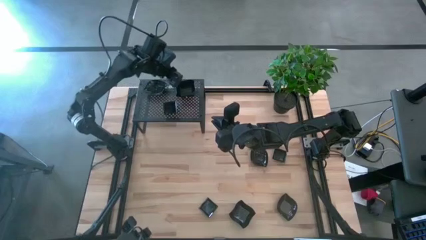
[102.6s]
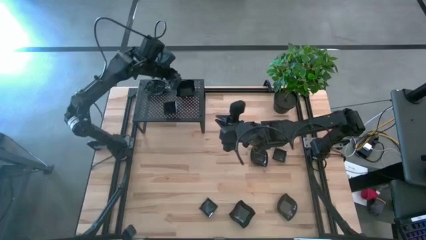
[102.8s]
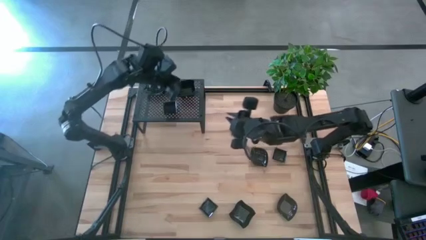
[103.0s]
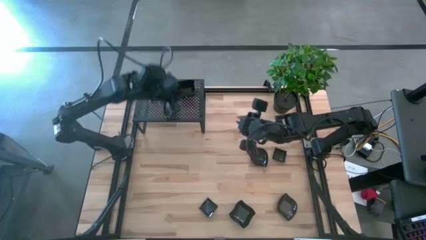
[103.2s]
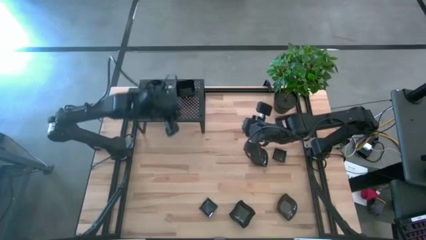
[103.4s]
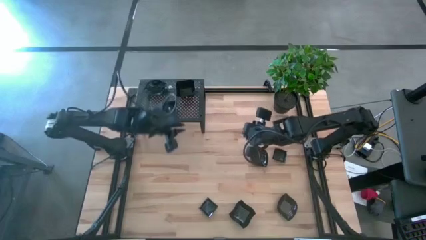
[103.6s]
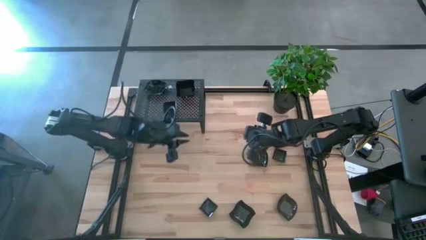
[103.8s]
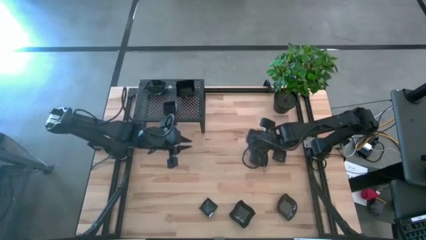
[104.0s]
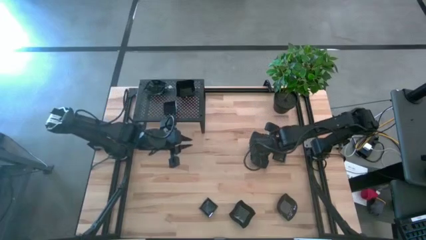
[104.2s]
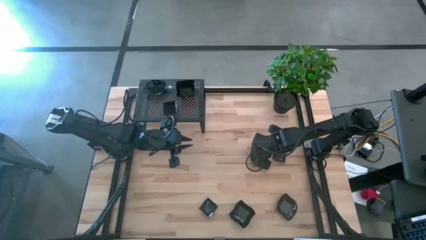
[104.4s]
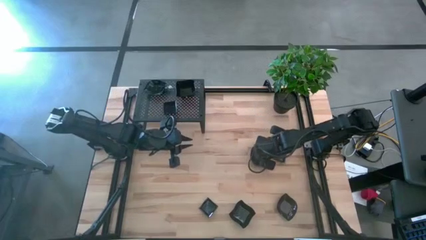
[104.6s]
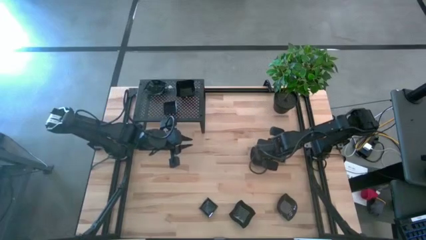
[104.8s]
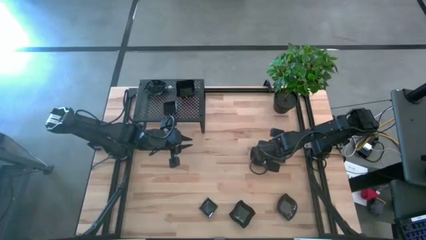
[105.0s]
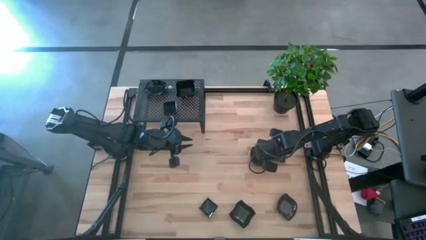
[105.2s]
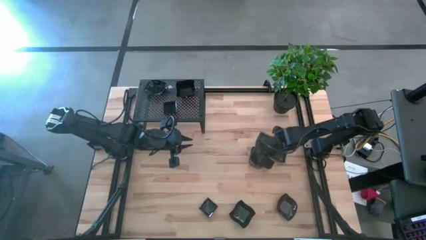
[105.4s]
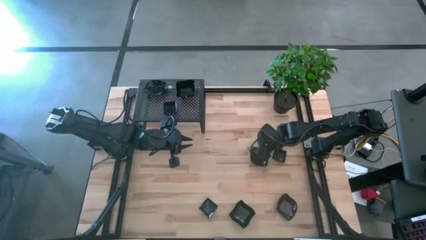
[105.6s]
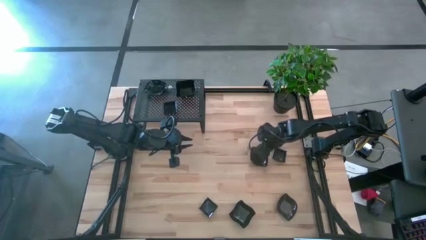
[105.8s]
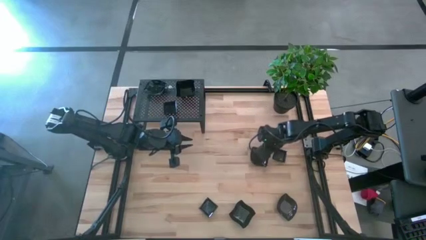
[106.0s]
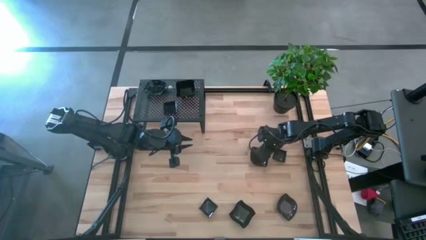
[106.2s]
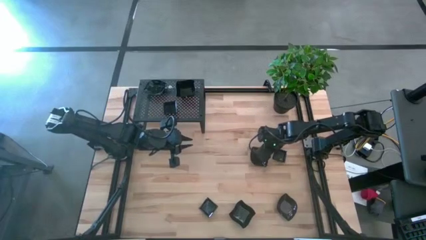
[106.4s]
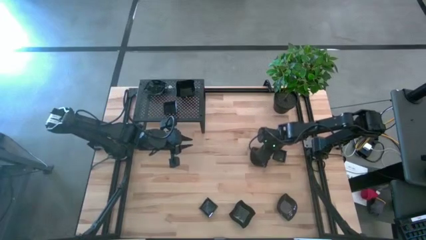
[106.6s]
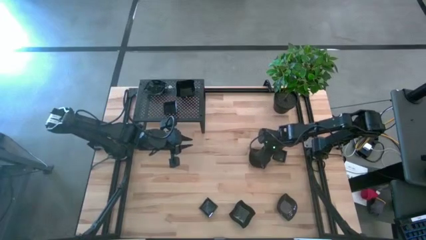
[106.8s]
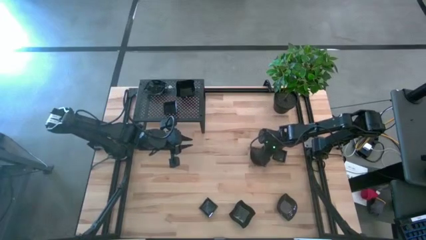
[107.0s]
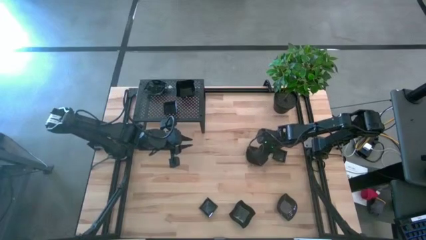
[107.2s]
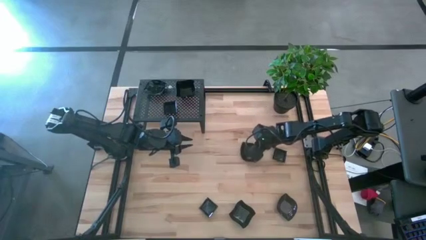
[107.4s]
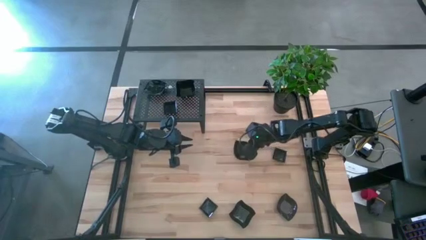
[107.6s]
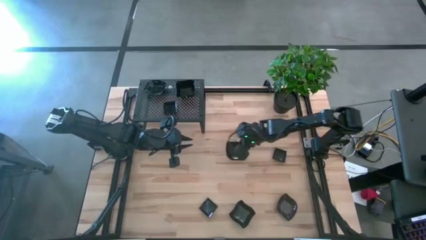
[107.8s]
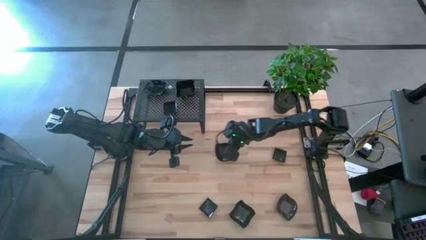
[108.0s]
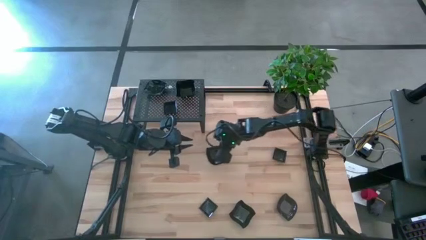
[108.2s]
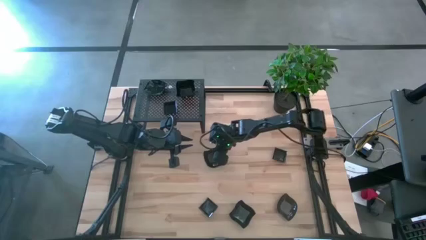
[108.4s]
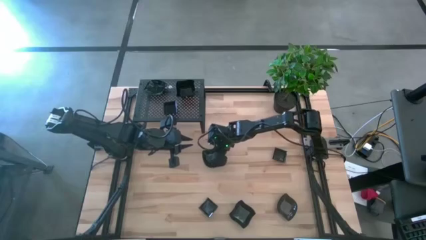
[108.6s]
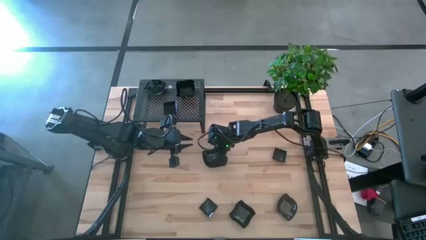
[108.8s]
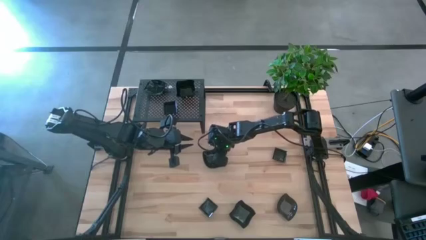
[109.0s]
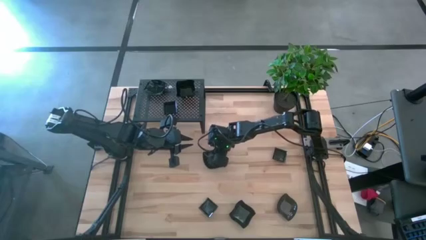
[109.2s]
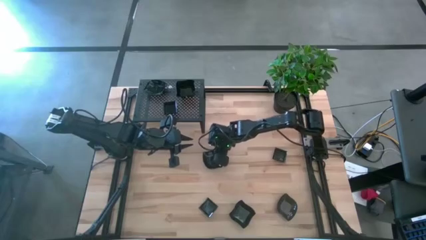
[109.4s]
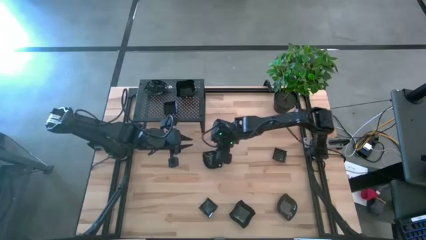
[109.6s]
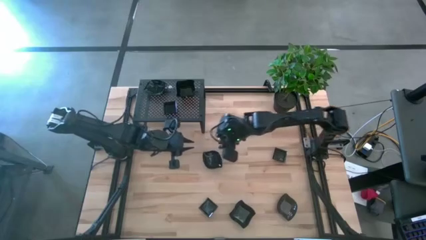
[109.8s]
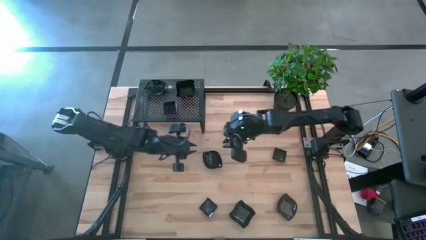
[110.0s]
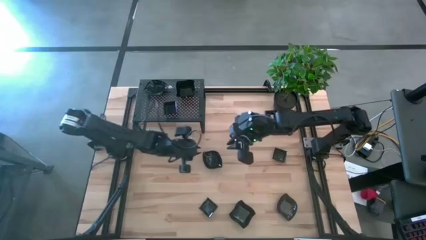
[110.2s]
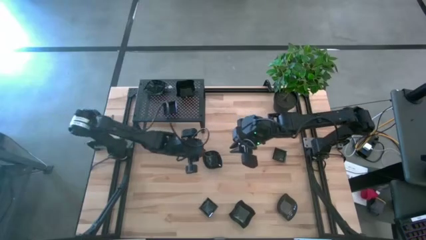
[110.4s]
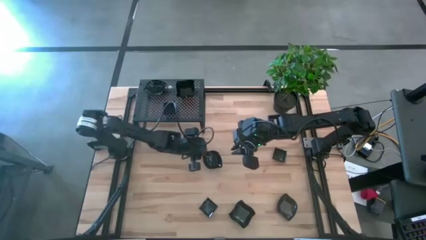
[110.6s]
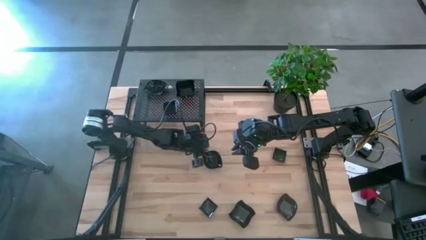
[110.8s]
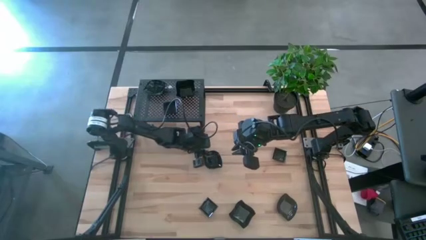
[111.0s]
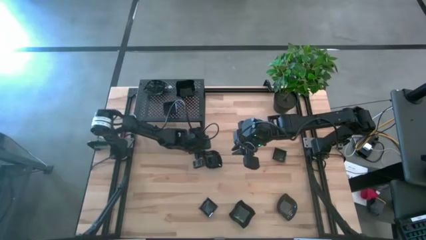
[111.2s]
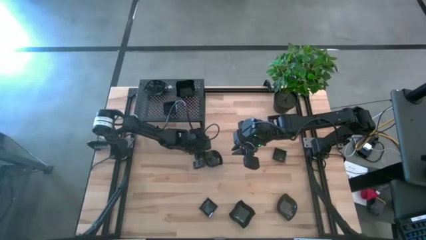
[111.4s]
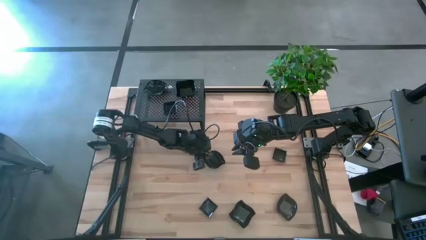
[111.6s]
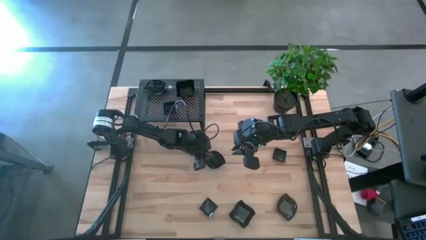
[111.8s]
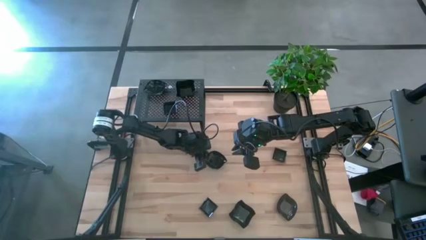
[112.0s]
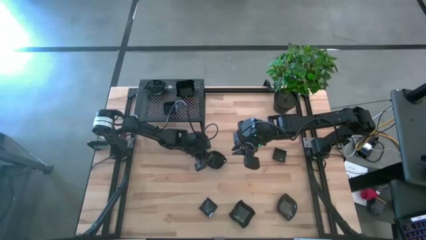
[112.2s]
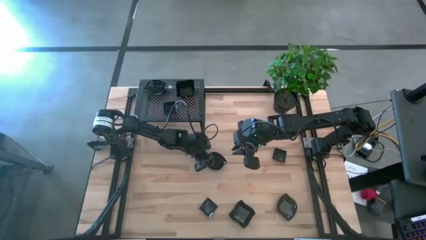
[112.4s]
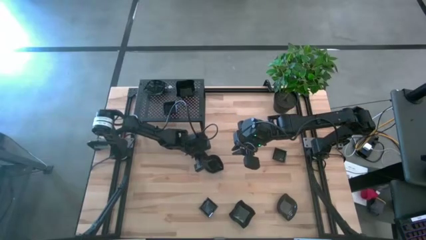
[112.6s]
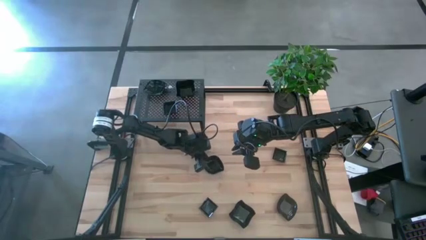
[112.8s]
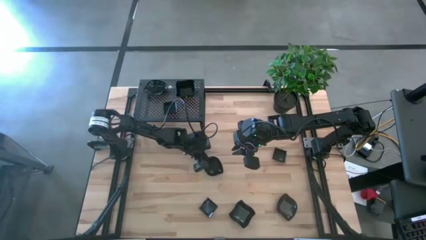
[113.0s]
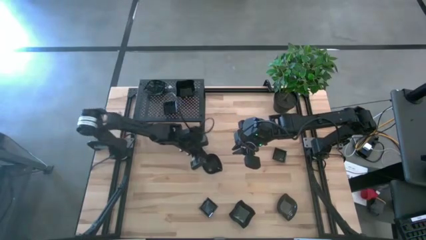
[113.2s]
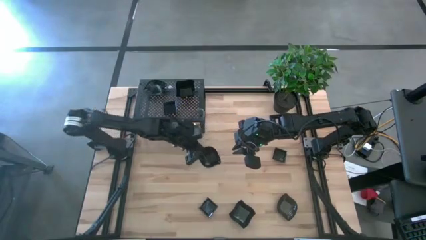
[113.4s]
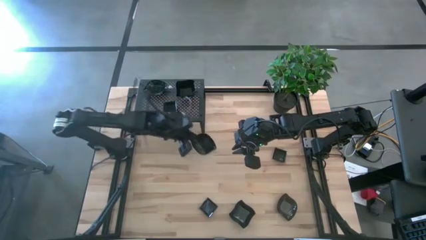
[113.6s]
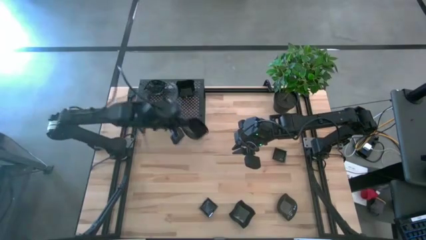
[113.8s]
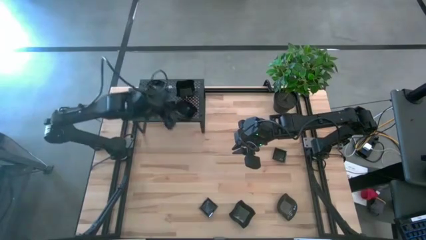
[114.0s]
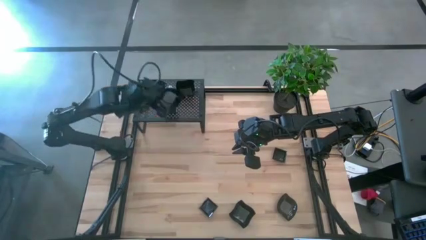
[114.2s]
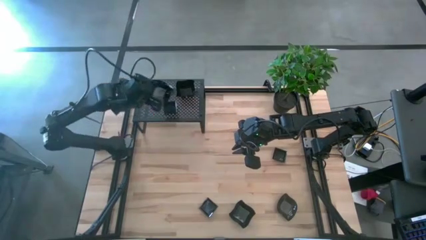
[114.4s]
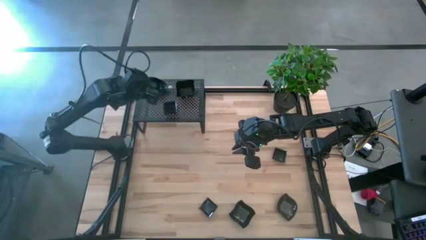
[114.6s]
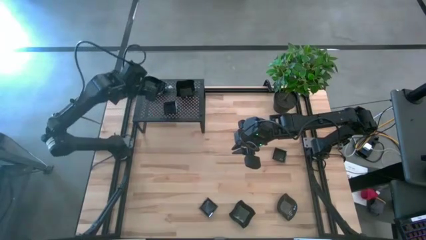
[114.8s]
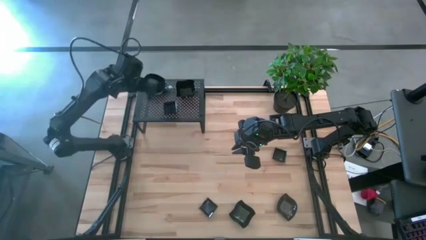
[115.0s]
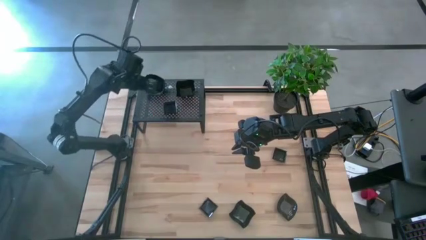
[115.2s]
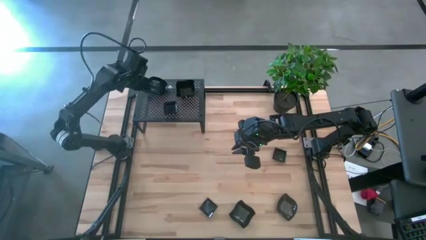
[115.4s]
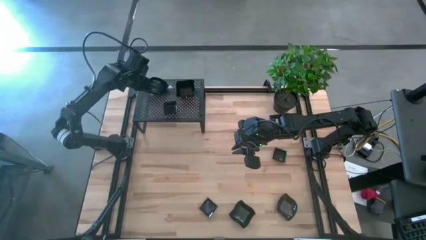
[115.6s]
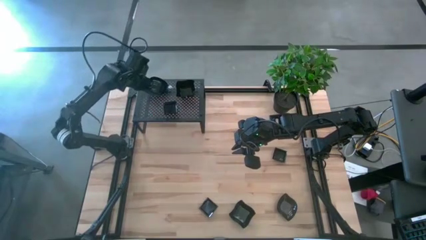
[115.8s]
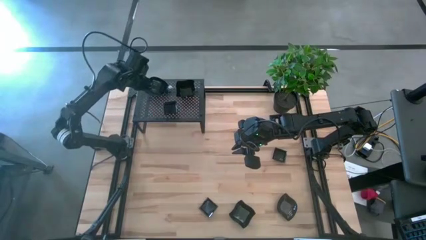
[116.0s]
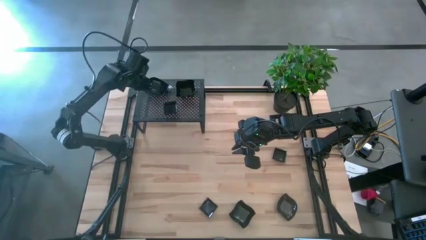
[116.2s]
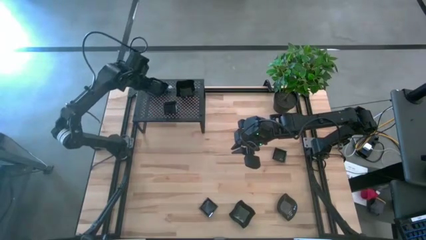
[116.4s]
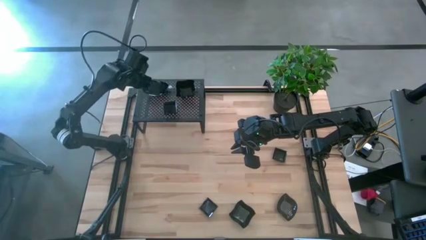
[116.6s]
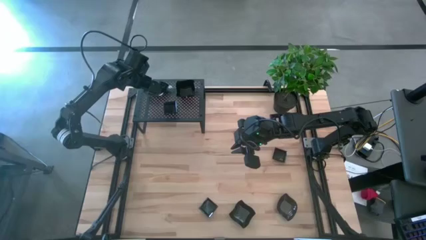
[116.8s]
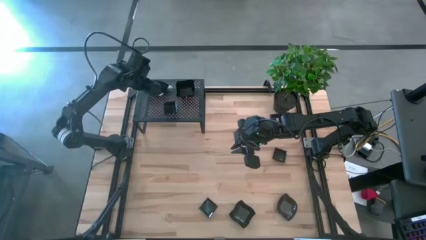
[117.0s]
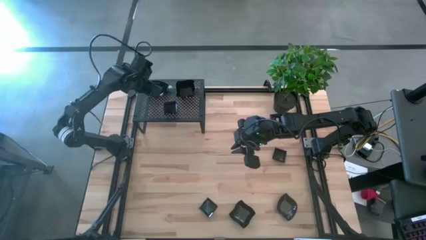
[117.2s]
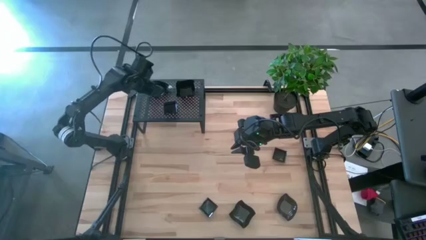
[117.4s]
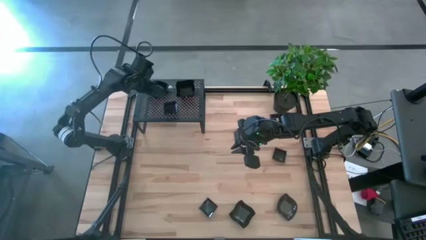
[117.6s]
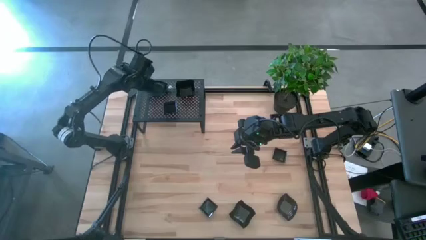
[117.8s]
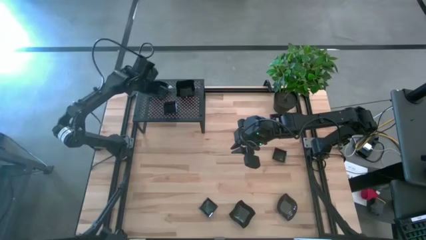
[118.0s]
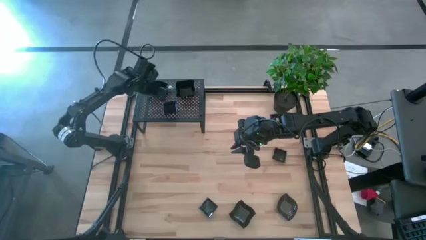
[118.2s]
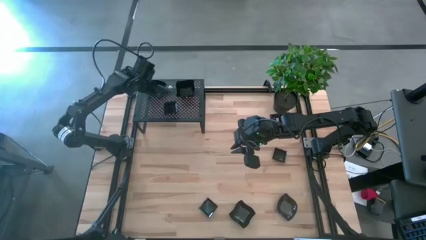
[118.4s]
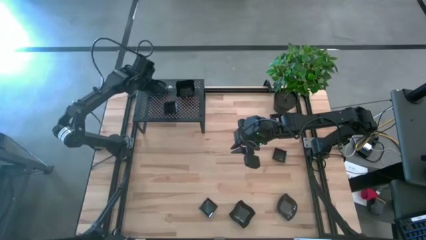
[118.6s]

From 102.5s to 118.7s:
Task: Pick & Place Mini shaped plates
Stack the leaf shaped plate on top of the stacked leaf shaped plate on the shelf
